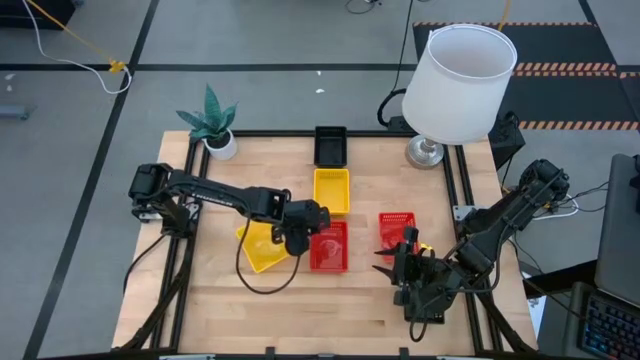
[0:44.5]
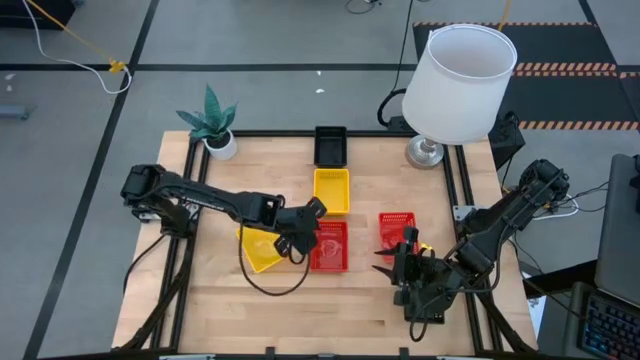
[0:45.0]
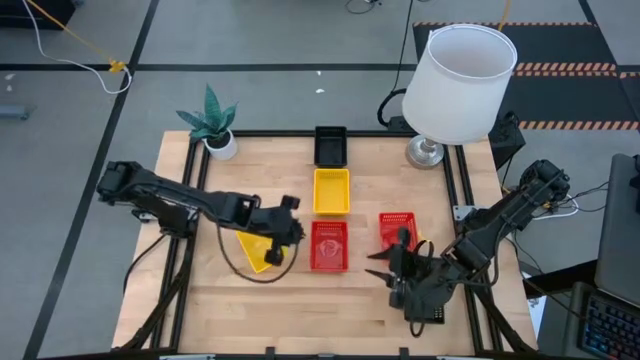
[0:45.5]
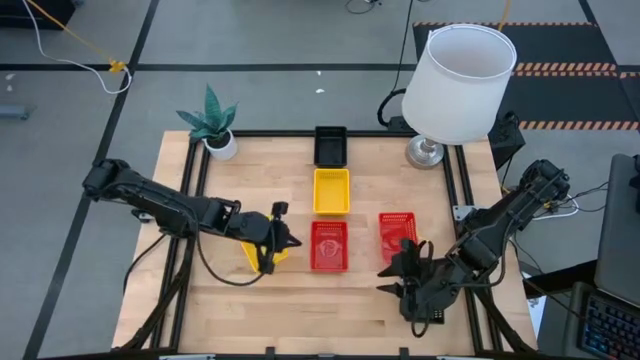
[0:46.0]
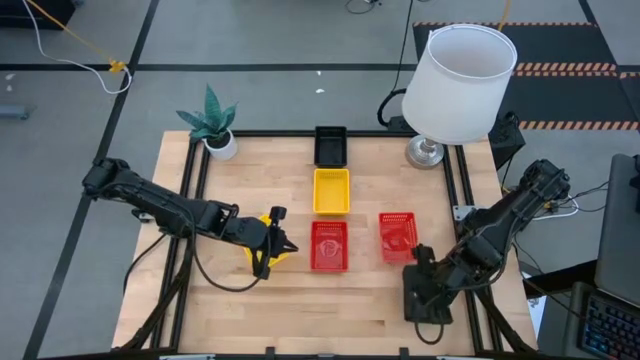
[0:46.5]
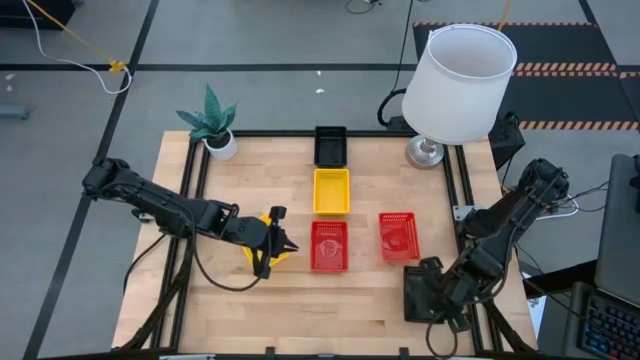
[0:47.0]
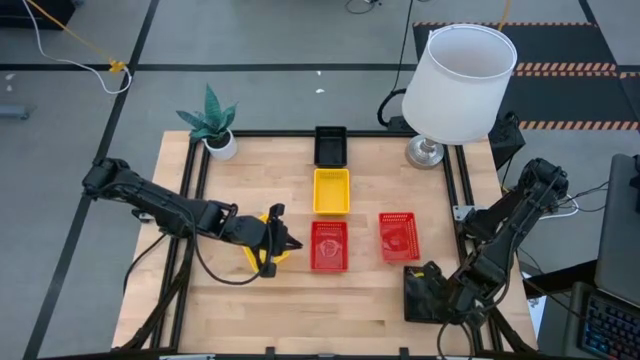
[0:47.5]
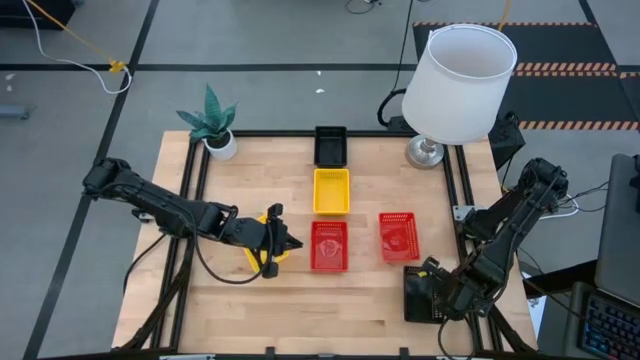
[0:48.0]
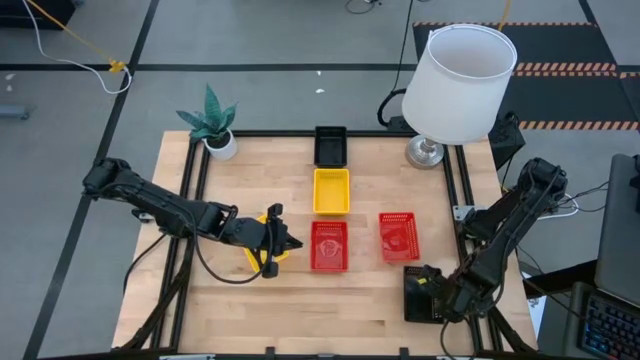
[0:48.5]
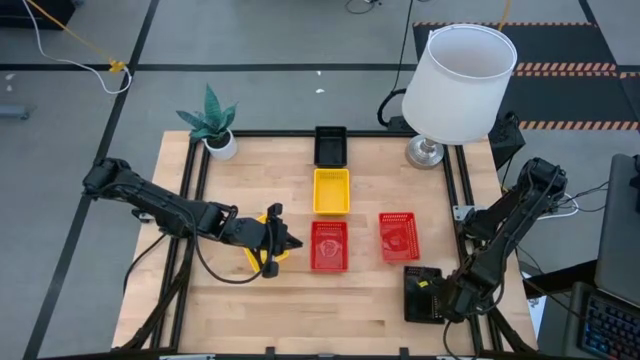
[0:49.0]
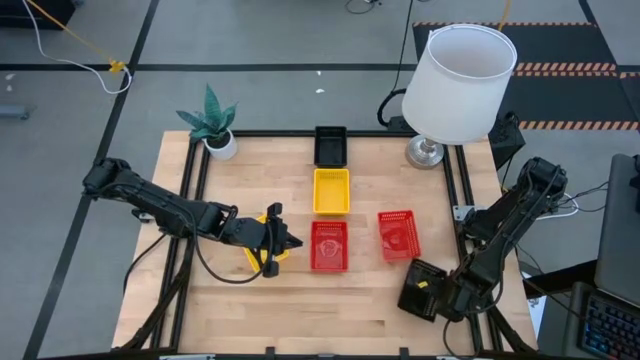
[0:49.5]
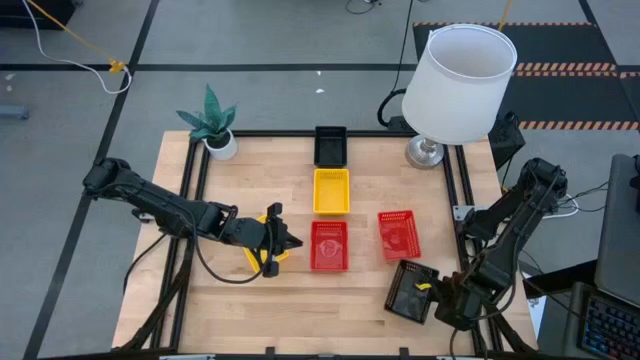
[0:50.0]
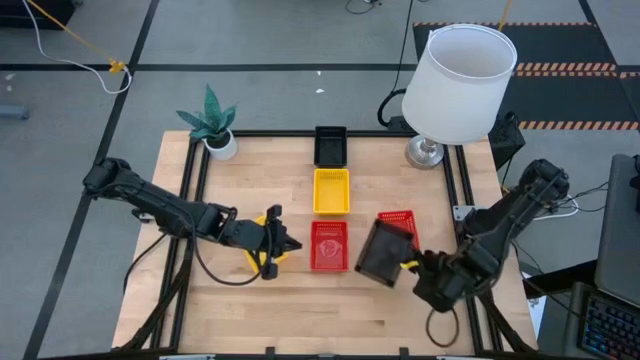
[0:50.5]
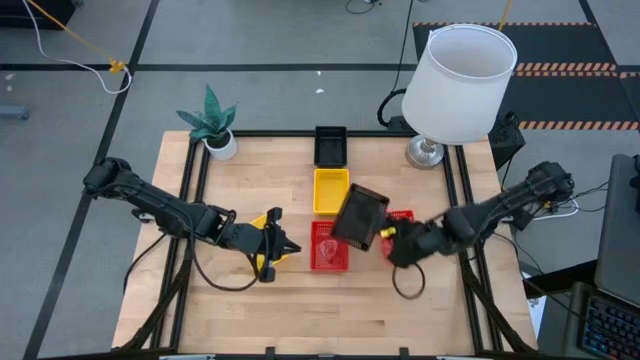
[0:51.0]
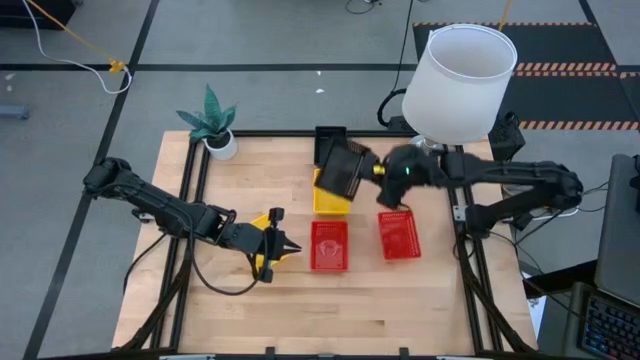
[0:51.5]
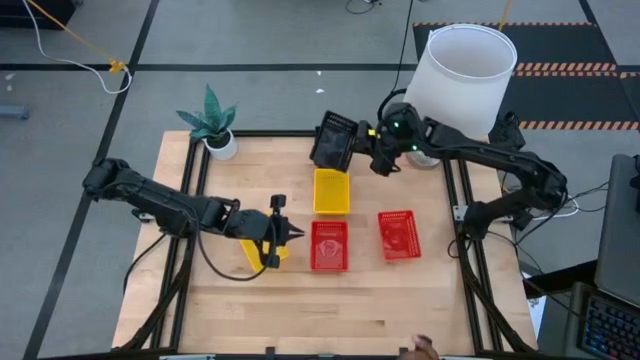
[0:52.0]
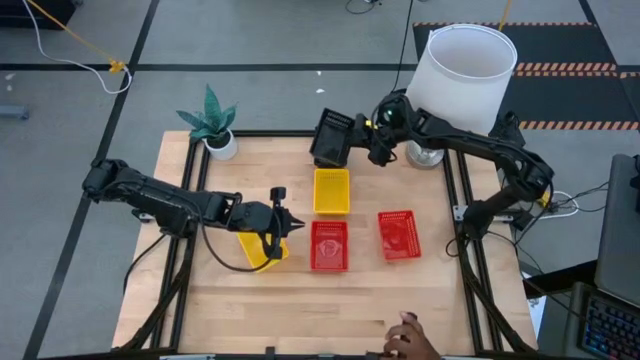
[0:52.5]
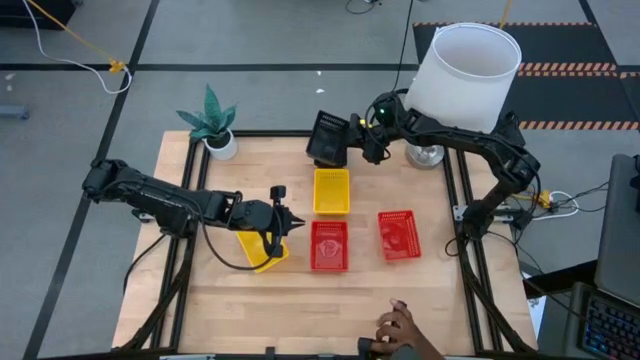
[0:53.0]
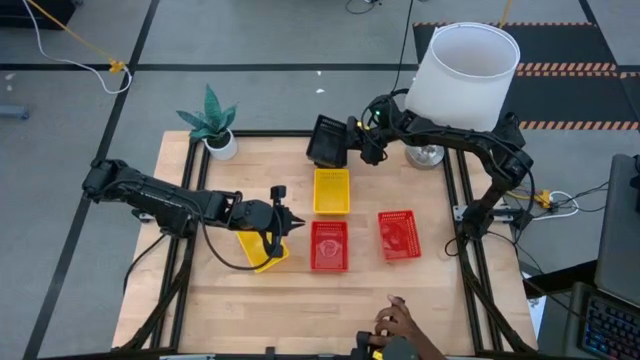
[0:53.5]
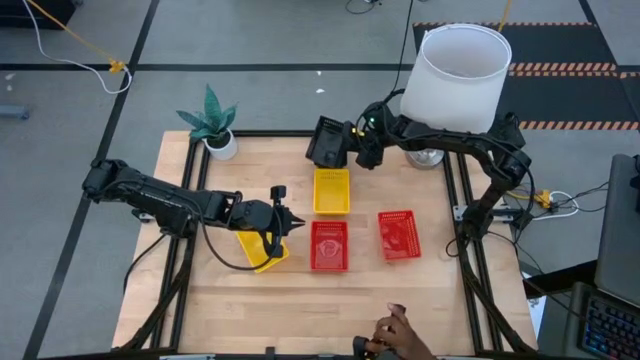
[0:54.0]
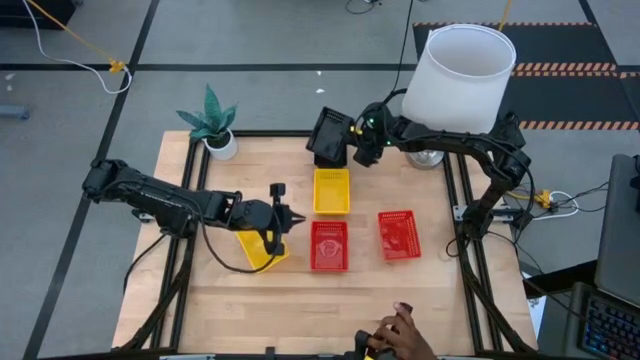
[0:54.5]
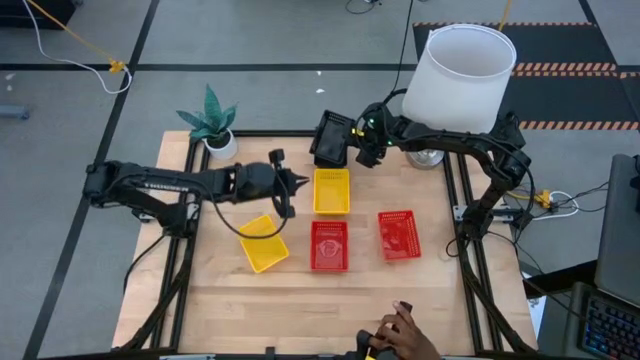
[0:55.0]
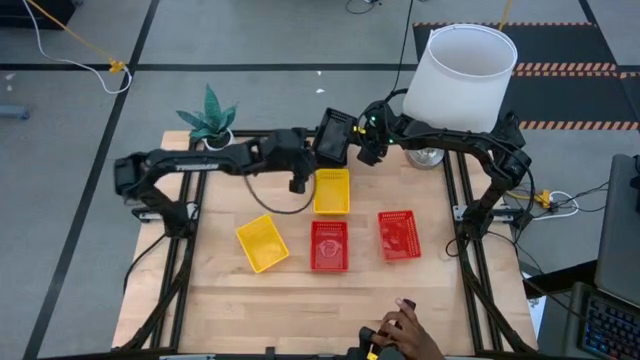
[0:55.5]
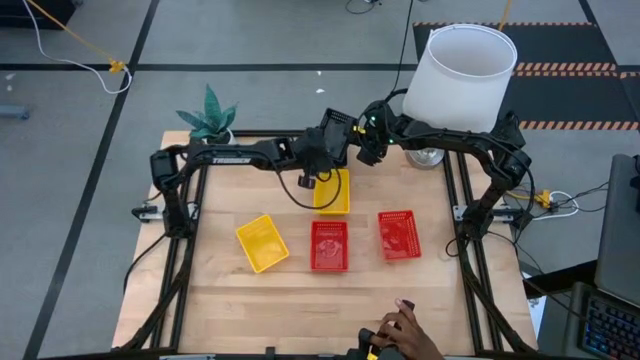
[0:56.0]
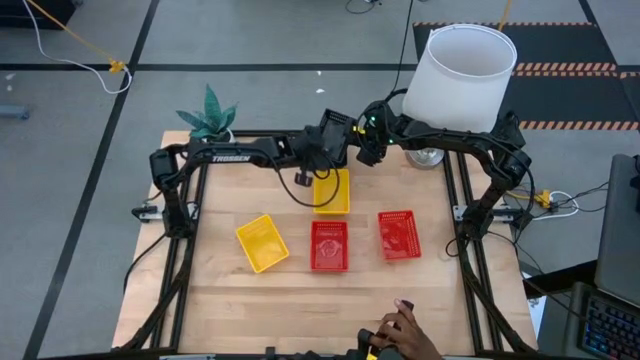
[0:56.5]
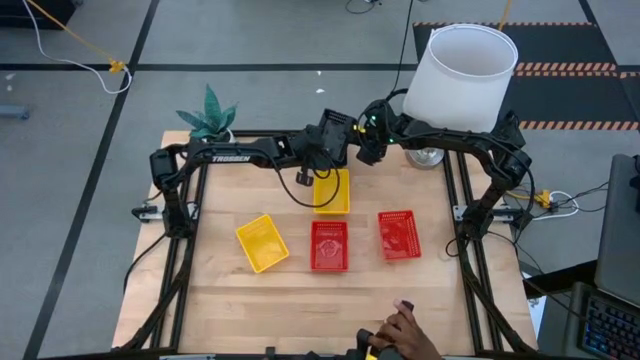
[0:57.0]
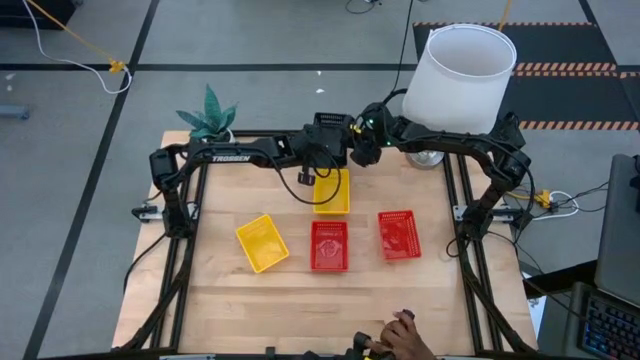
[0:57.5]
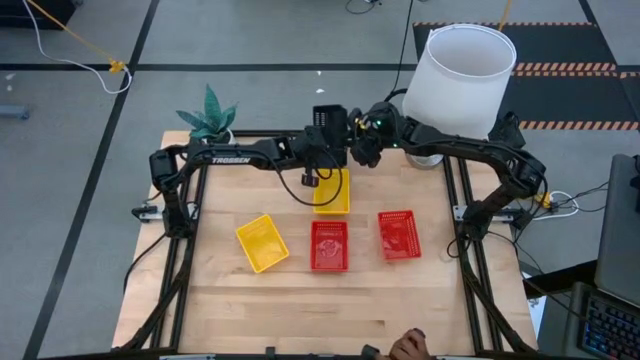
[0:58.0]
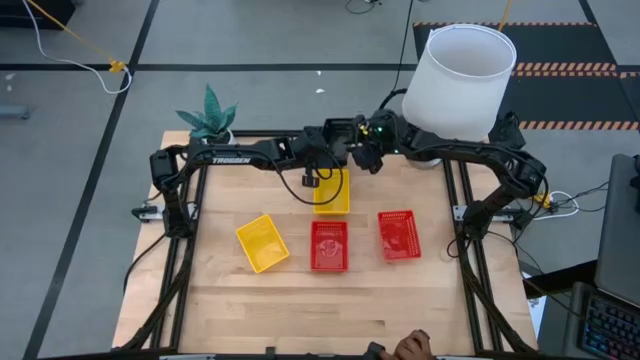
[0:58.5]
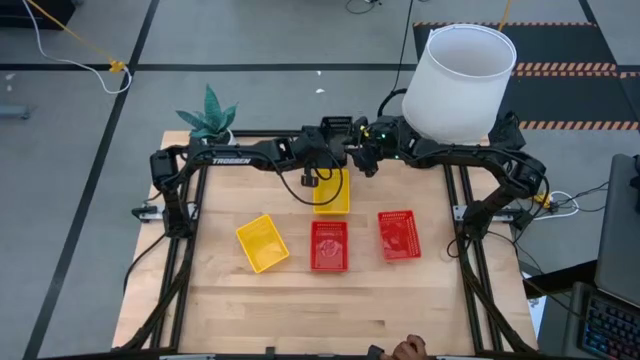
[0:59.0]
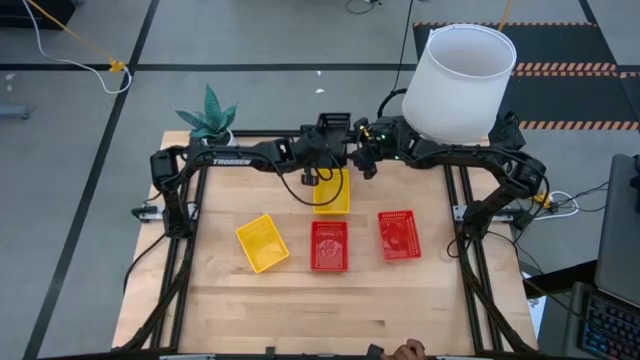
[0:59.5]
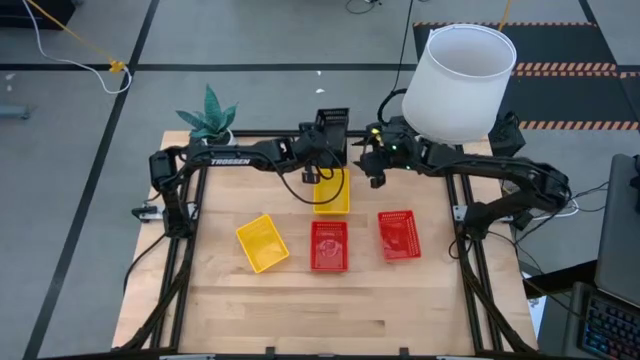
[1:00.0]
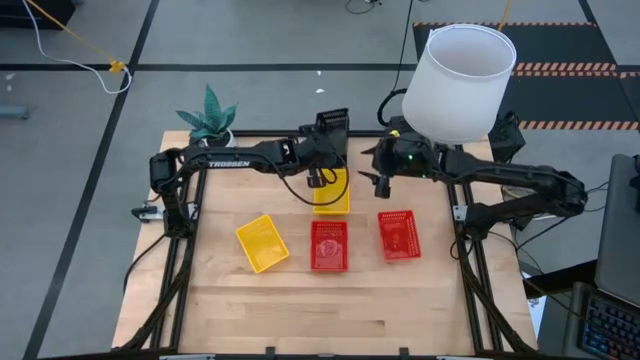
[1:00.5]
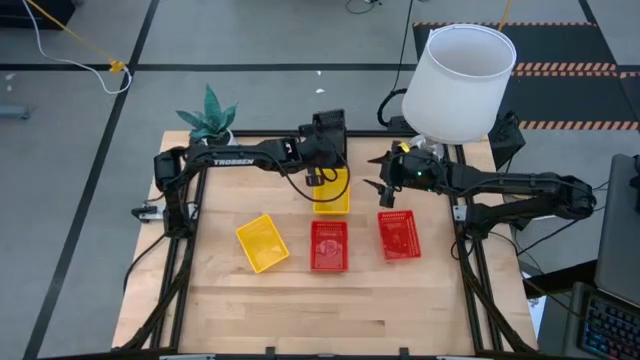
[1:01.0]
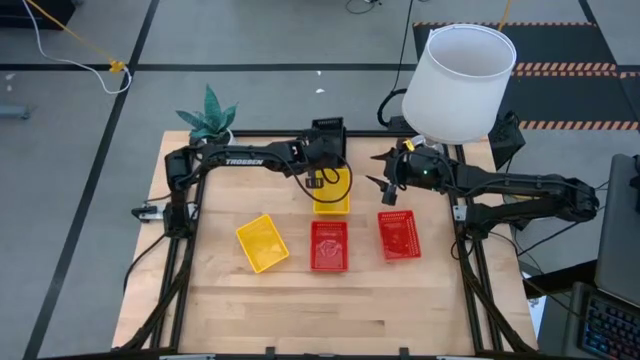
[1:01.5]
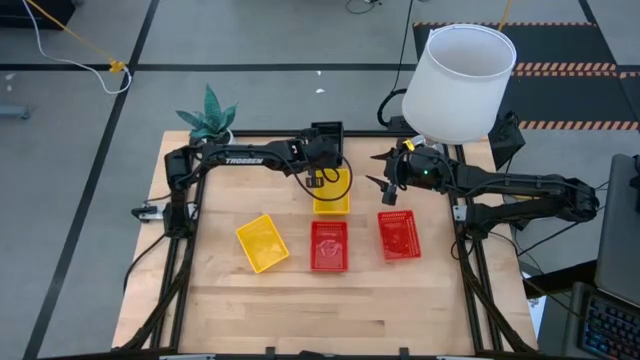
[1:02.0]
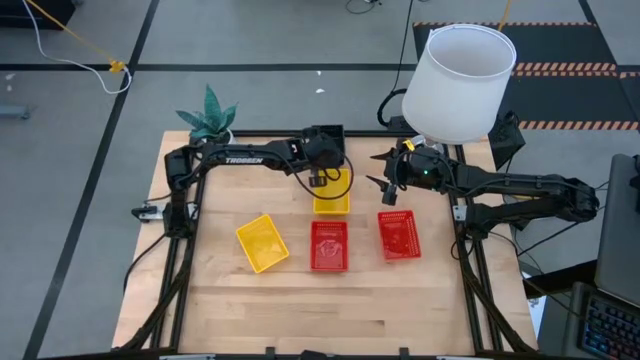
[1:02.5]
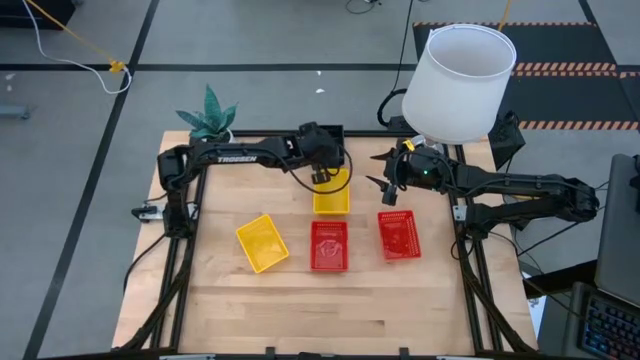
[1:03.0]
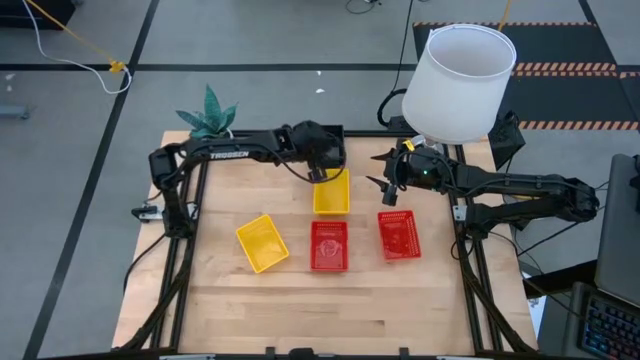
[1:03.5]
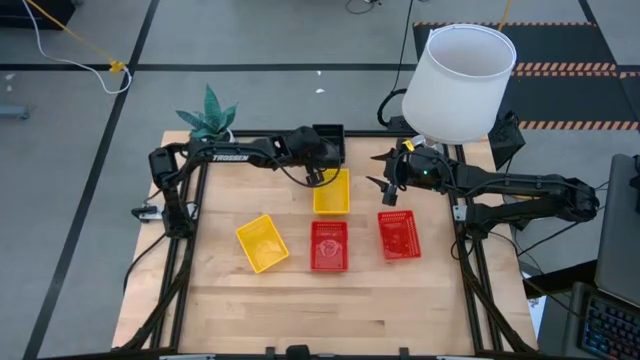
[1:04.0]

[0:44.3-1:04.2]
Stack the bottom black bin on top of the top black bin

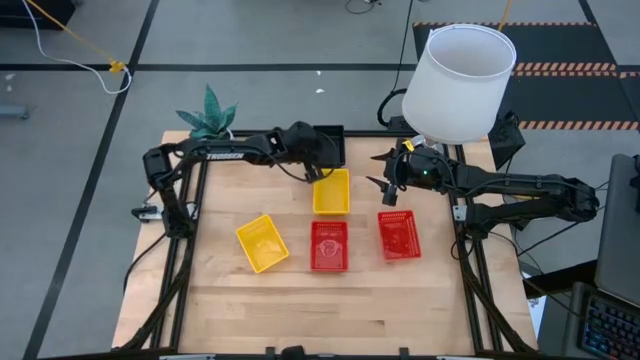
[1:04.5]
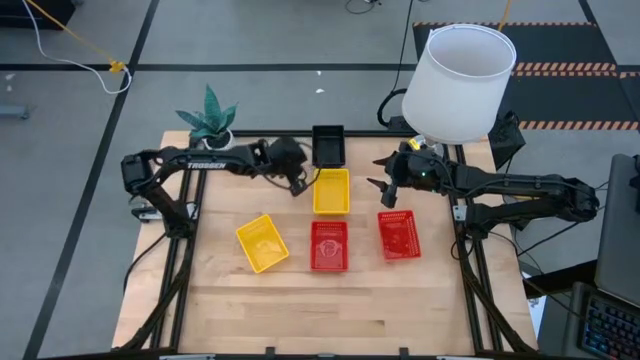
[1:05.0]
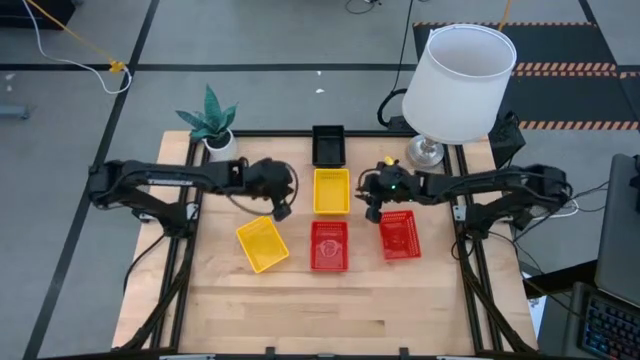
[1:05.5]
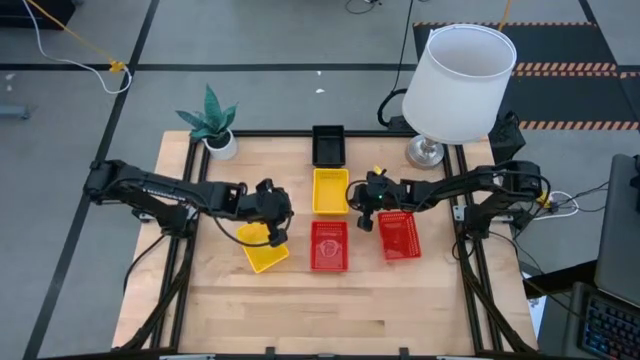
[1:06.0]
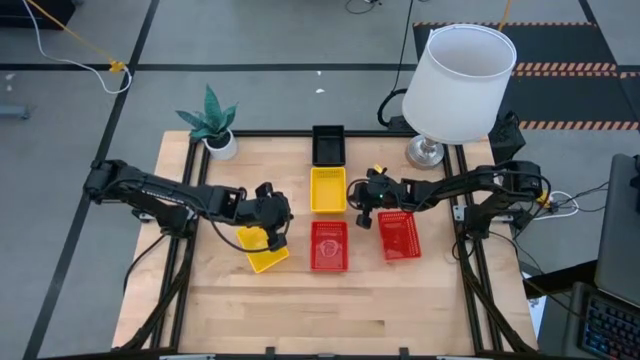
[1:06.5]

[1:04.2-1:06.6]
Adjust the stacked yellow bins
